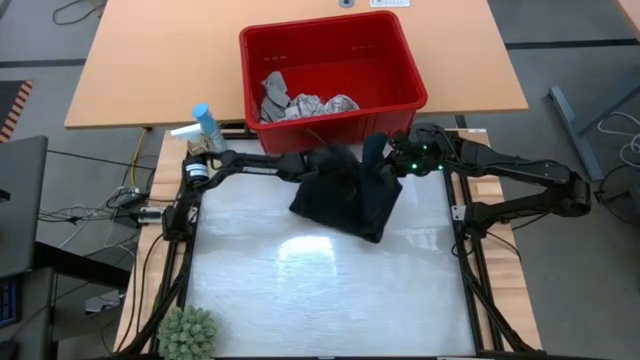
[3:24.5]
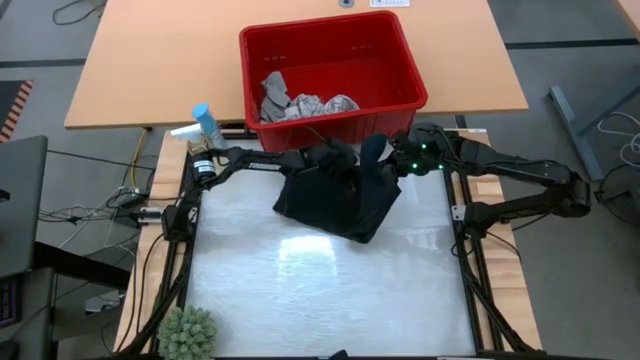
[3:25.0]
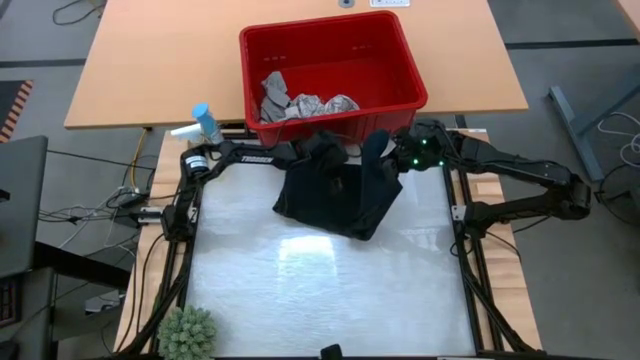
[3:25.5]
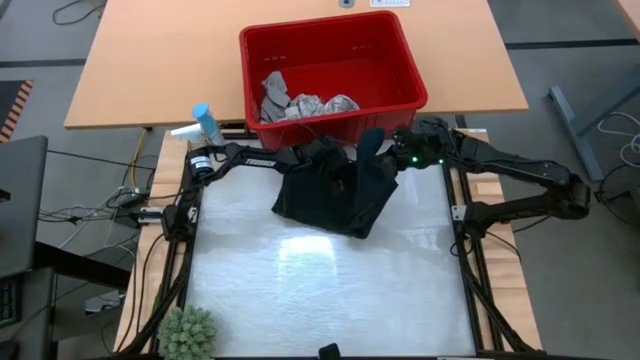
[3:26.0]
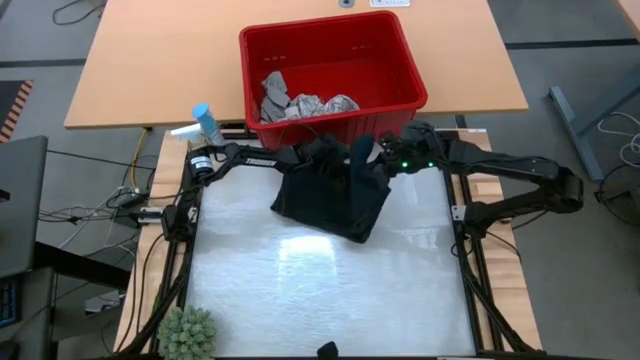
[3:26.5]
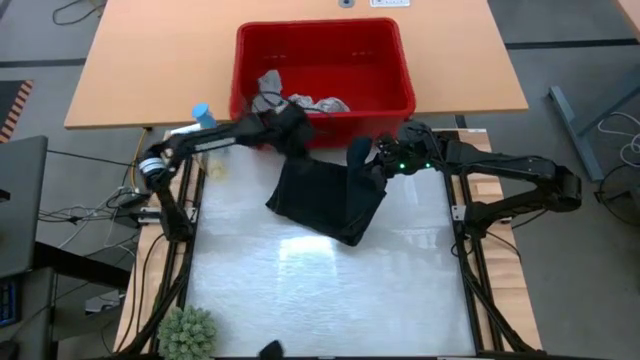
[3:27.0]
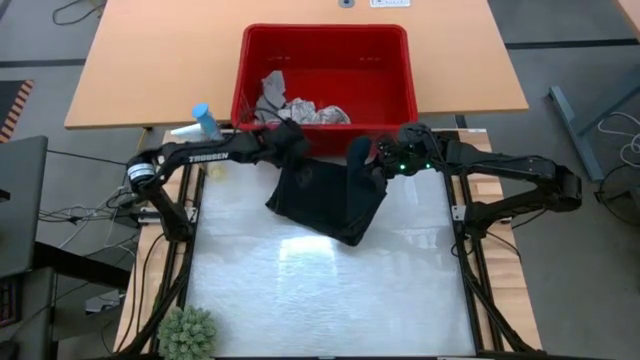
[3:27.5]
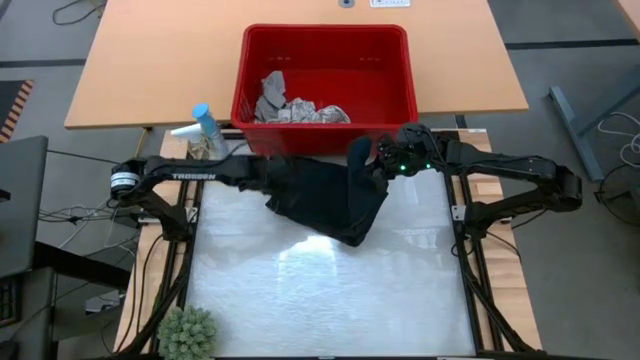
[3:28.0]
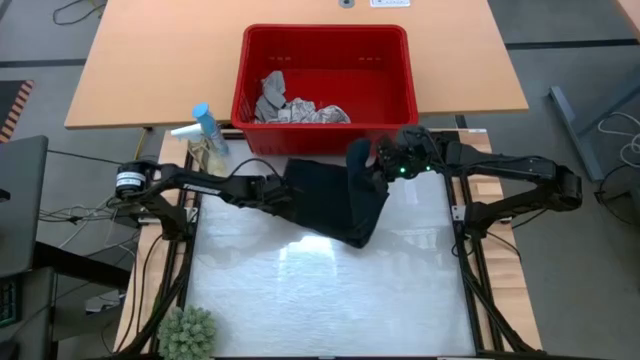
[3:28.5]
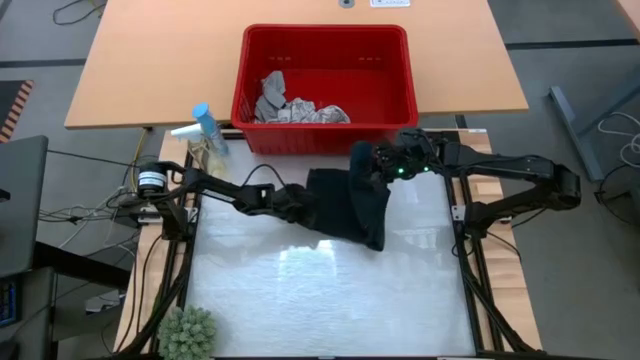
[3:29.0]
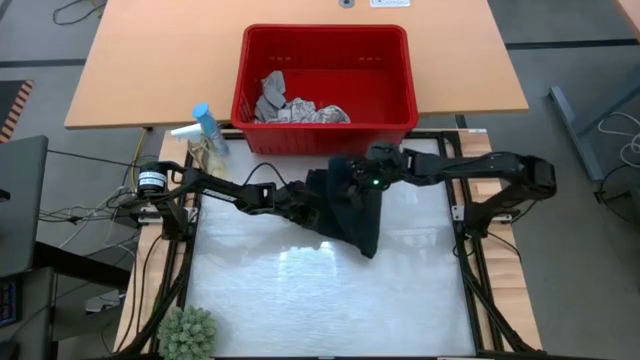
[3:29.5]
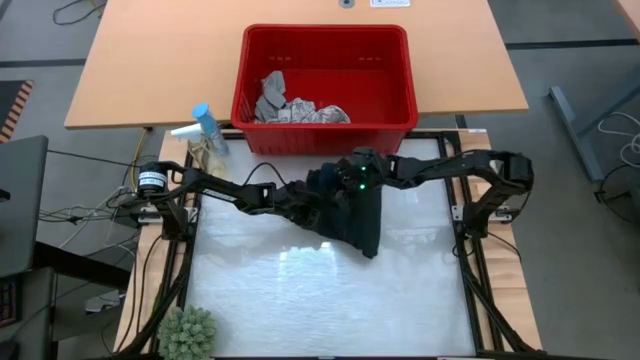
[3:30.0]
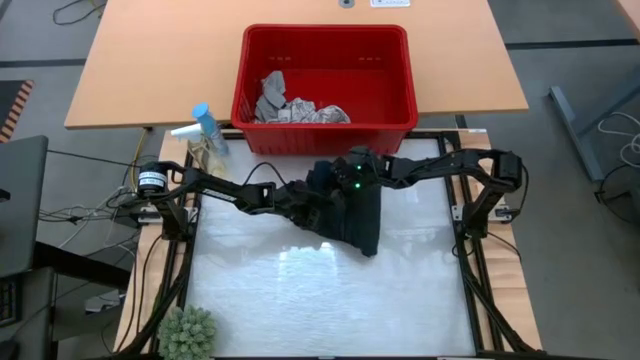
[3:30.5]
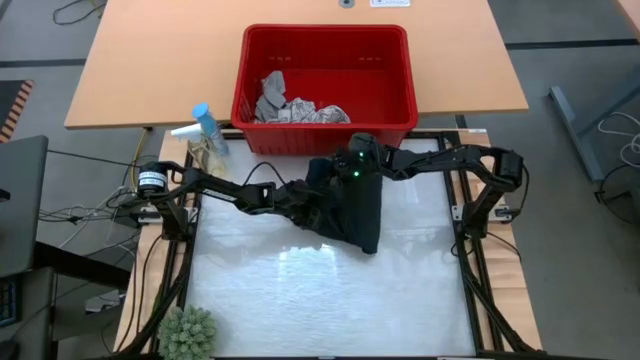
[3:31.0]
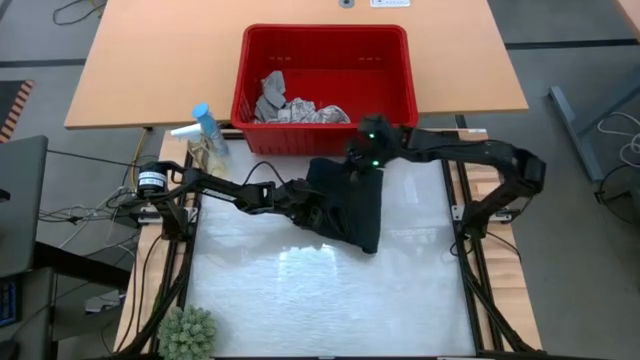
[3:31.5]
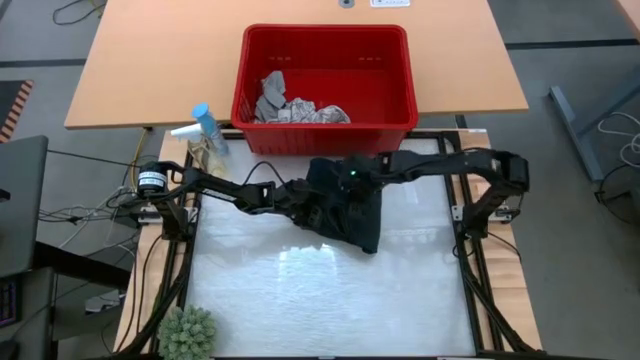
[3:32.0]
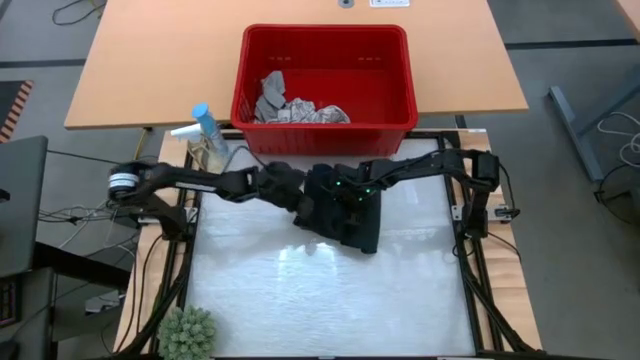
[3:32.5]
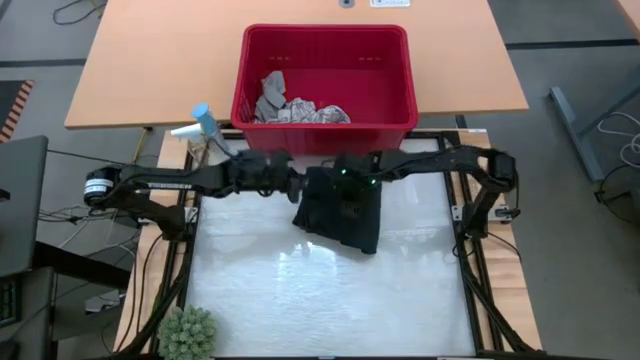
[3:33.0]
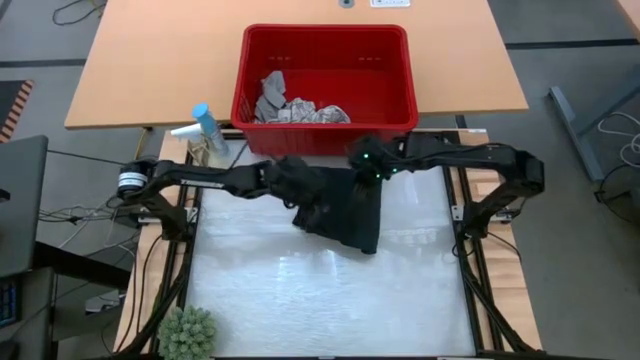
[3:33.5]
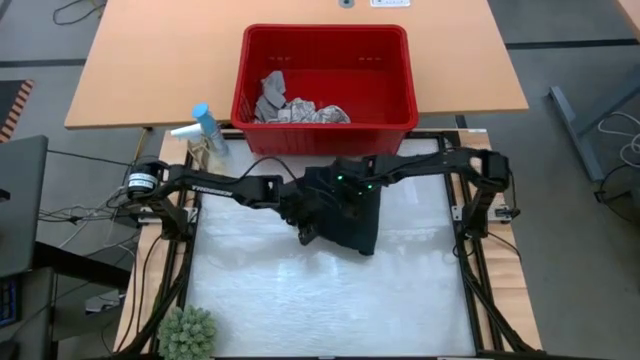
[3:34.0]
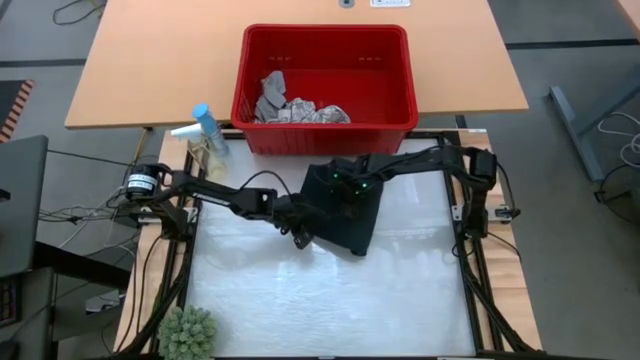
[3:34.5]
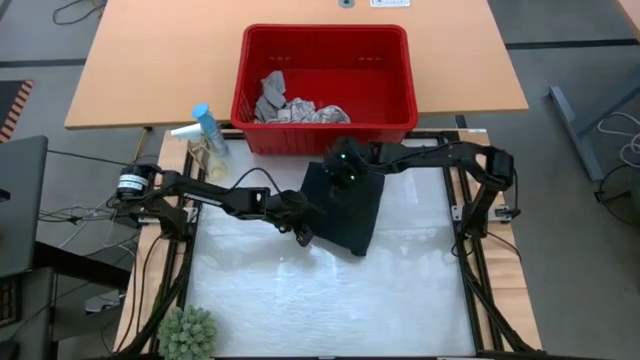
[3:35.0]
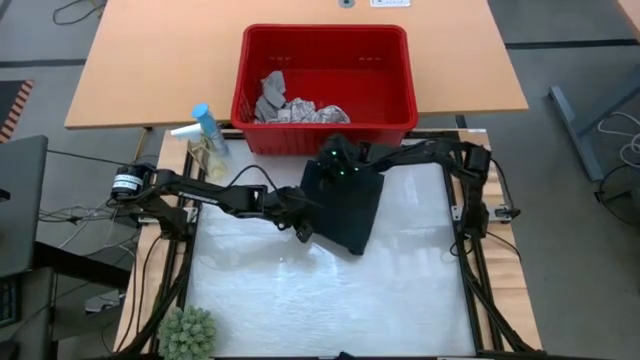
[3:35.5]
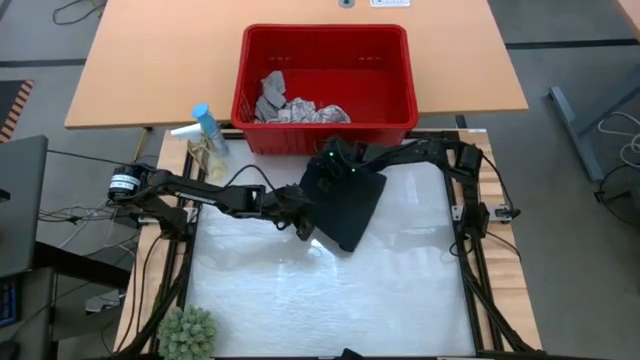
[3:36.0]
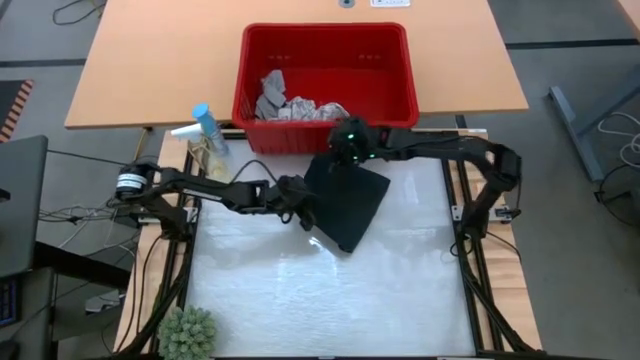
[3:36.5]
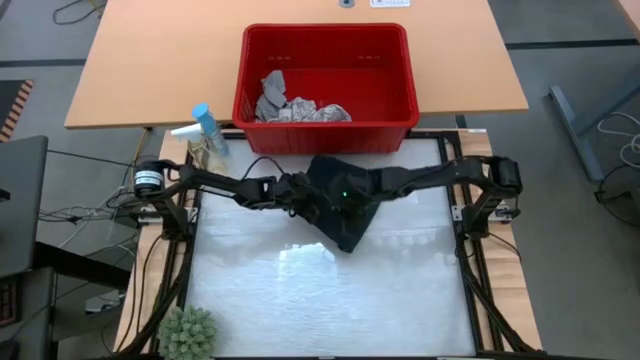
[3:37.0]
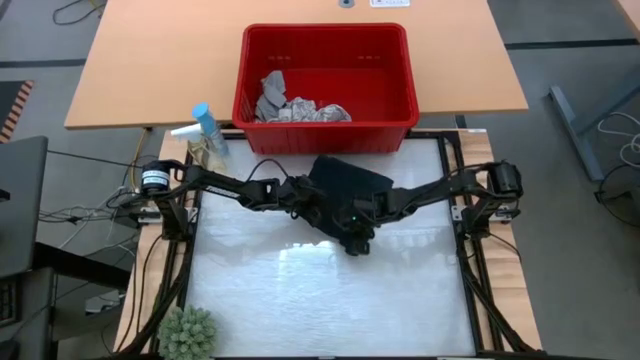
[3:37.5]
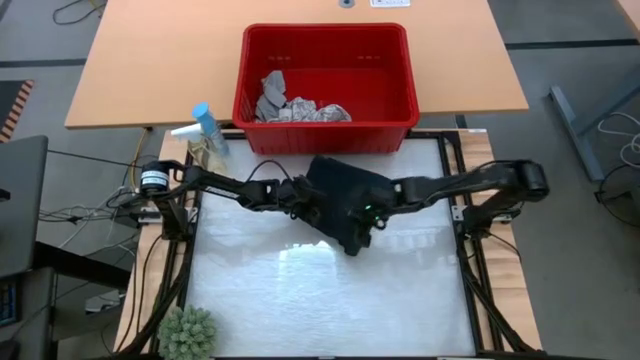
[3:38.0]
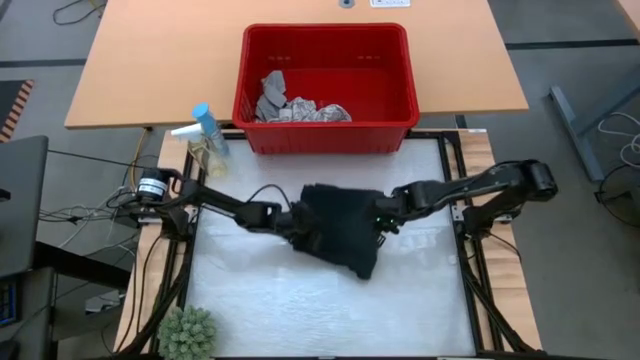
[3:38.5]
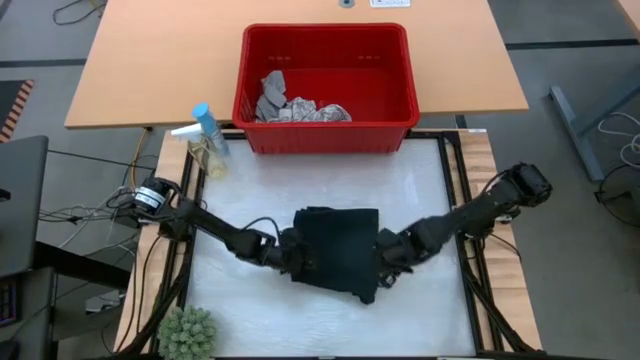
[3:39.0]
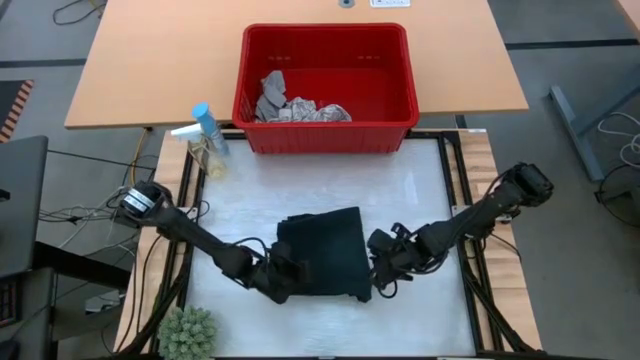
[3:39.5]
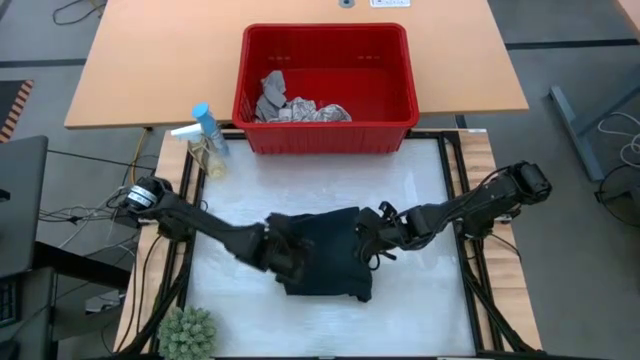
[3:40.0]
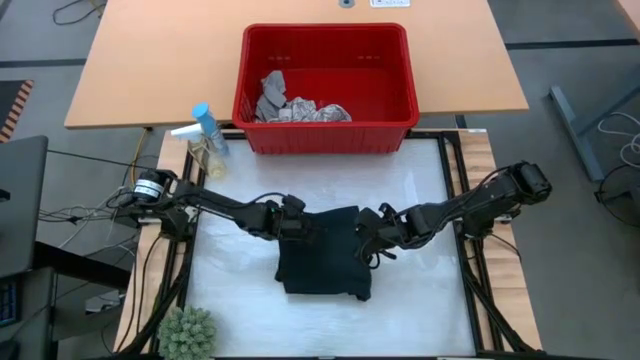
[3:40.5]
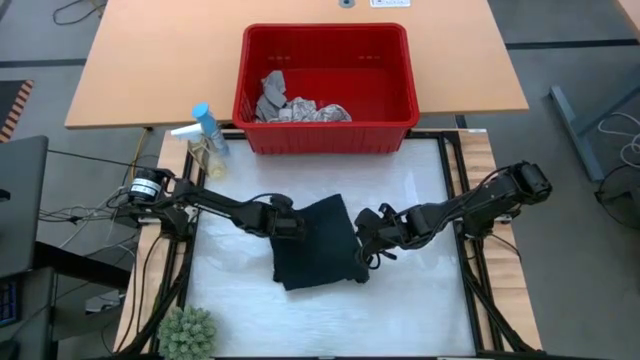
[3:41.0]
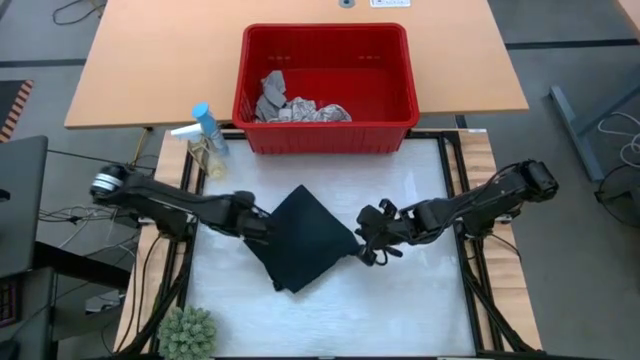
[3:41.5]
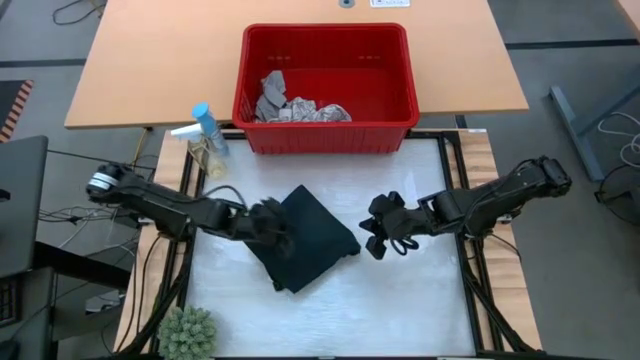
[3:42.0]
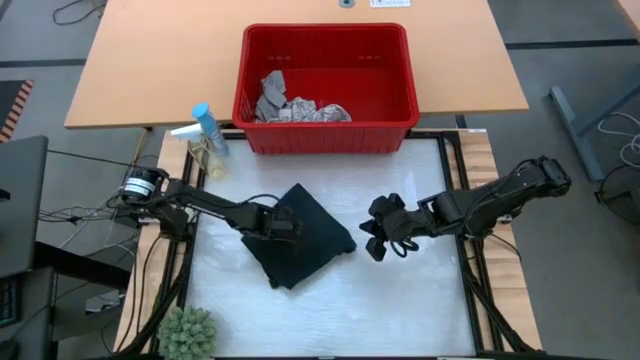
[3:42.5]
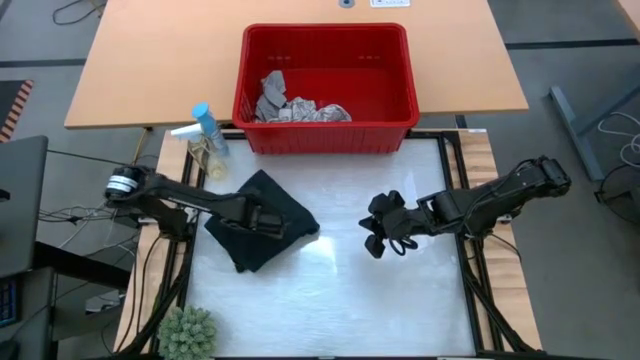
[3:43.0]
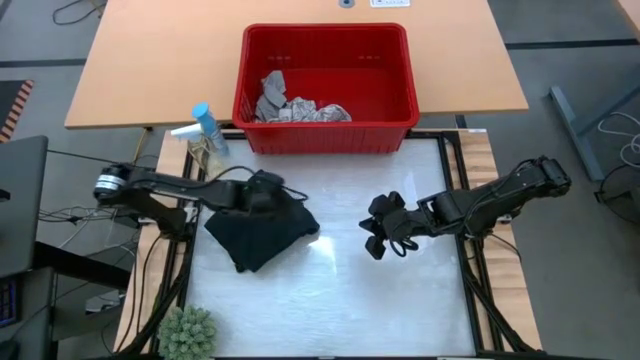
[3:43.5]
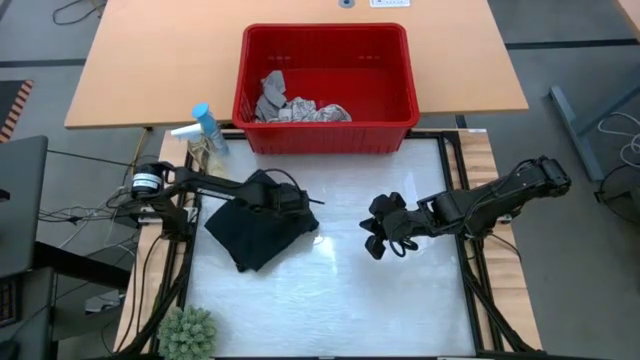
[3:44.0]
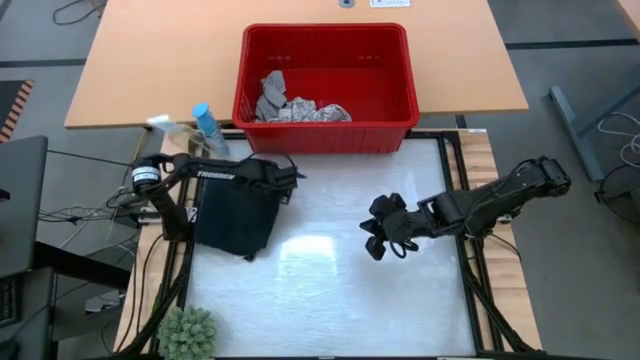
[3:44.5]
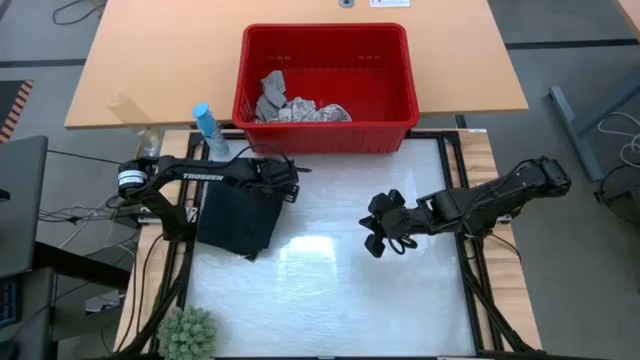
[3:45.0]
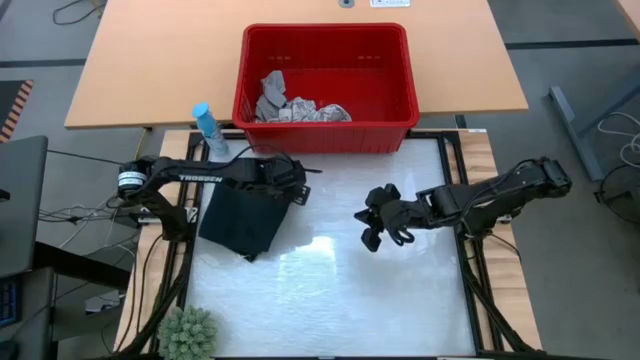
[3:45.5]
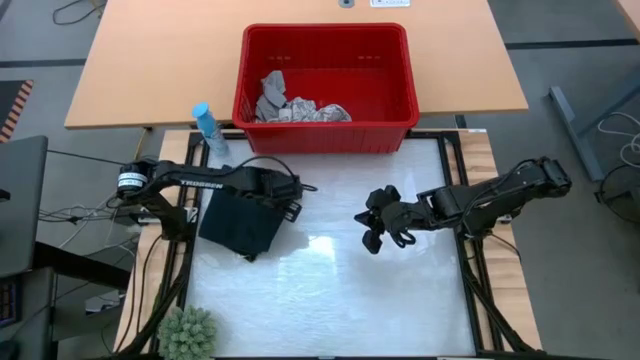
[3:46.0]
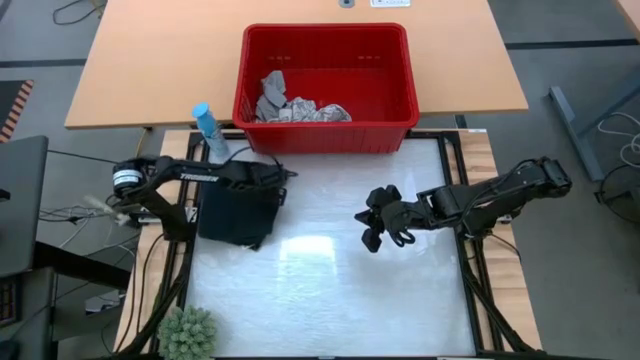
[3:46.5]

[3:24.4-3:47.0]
Task: Fold Laundry from Bin
Fold the blue jeans
